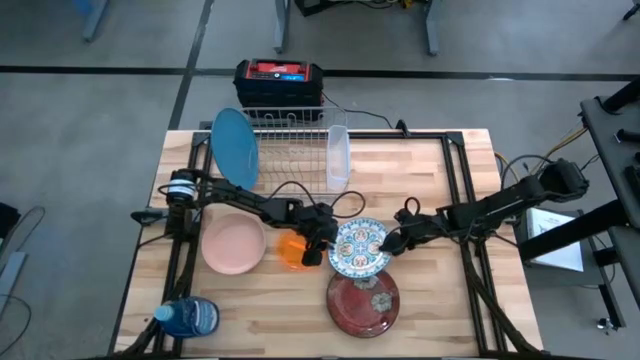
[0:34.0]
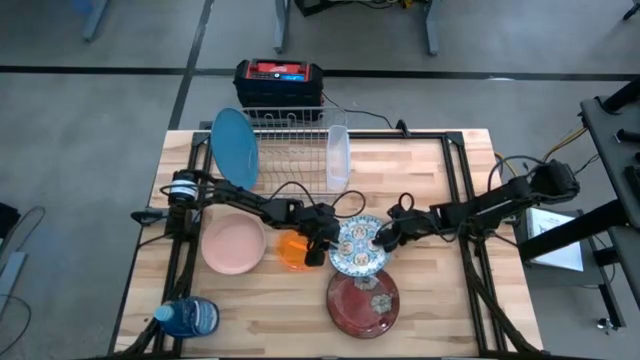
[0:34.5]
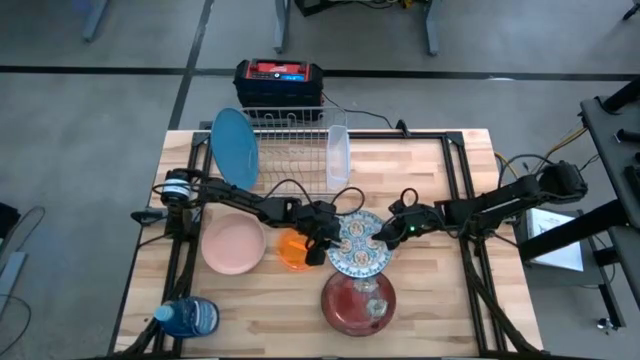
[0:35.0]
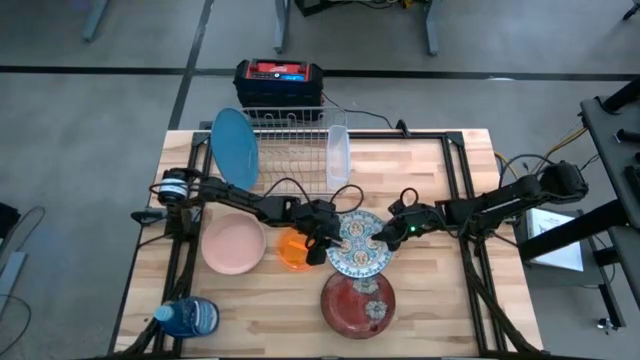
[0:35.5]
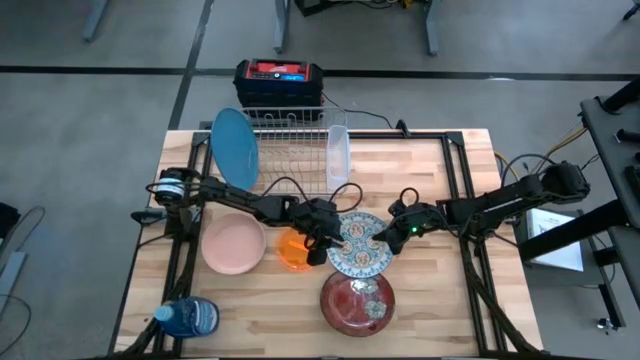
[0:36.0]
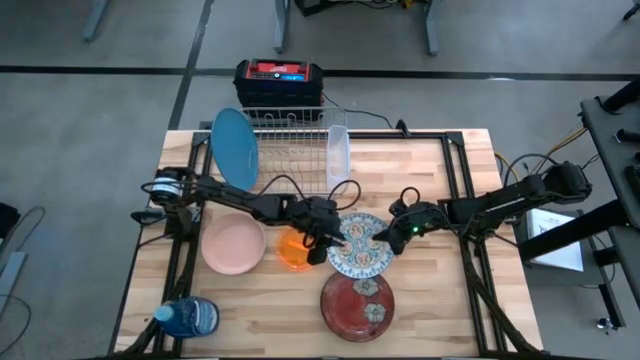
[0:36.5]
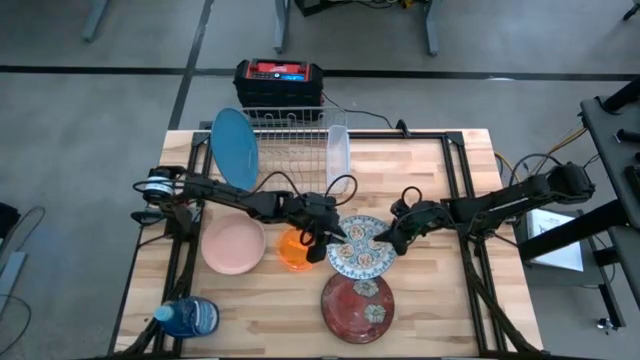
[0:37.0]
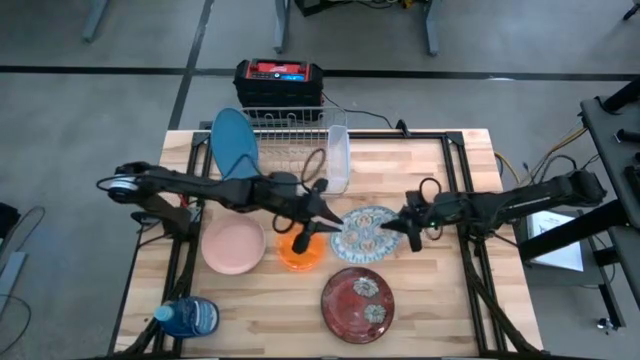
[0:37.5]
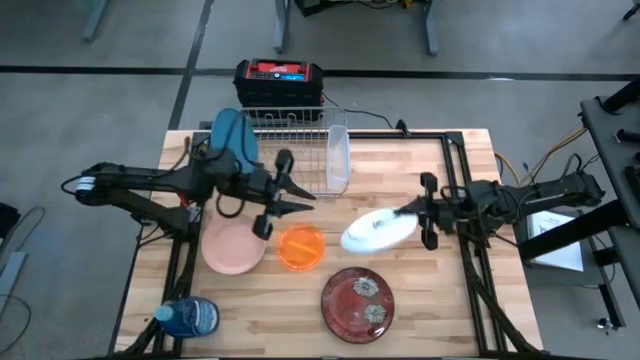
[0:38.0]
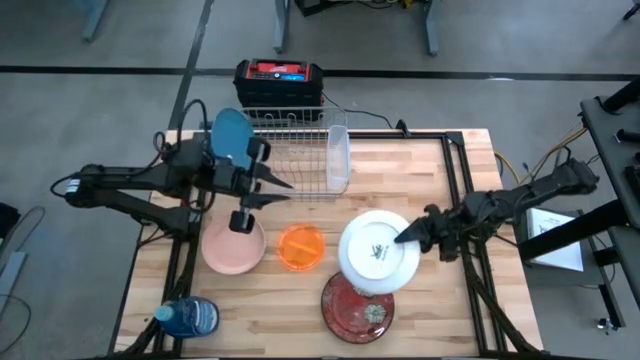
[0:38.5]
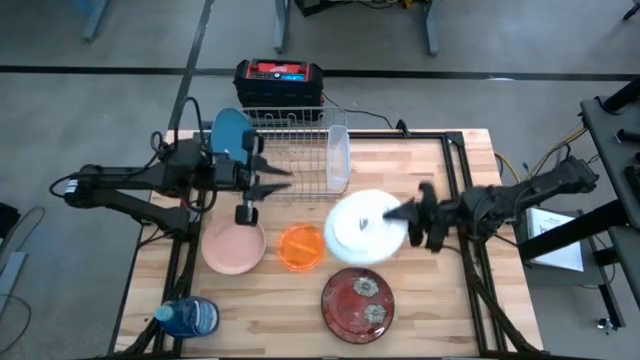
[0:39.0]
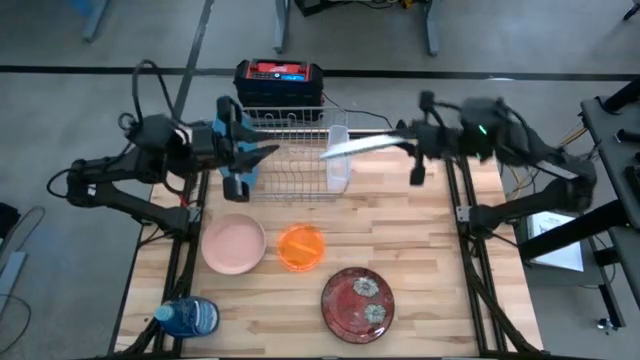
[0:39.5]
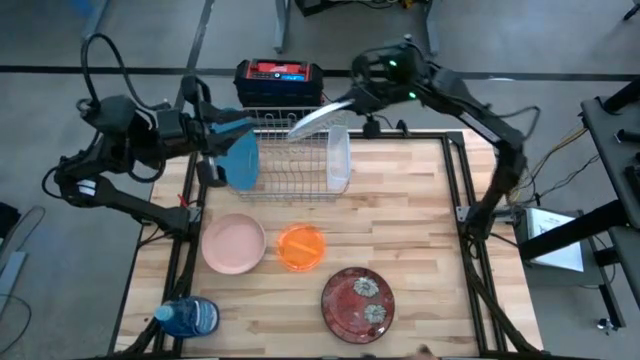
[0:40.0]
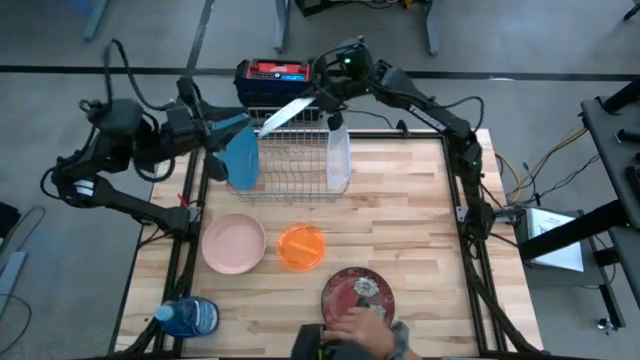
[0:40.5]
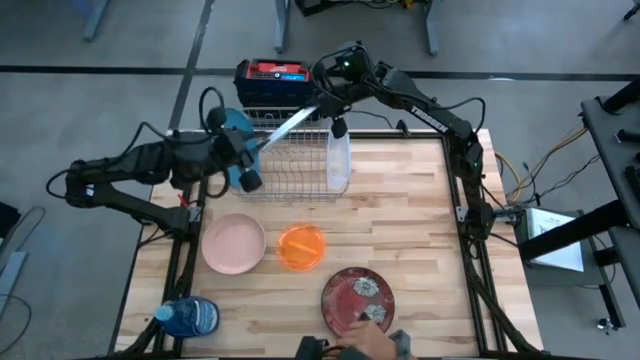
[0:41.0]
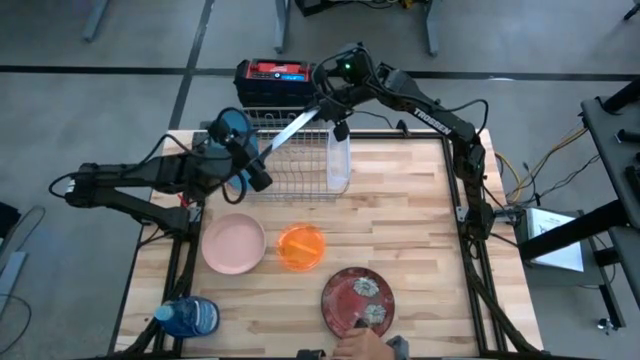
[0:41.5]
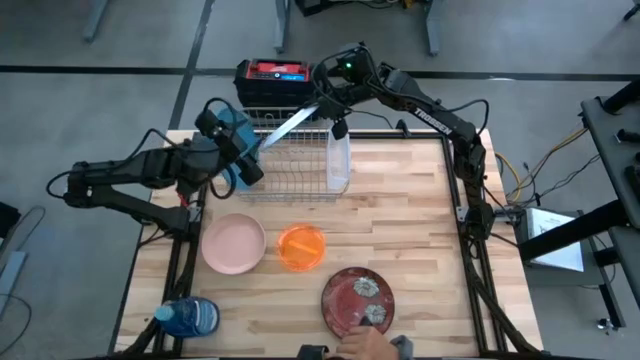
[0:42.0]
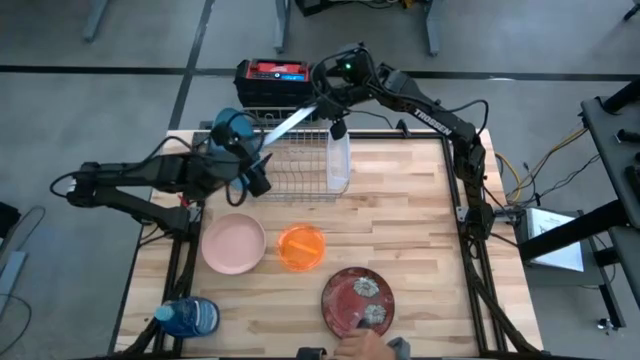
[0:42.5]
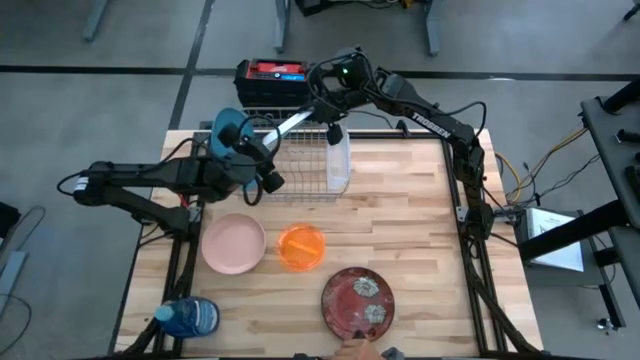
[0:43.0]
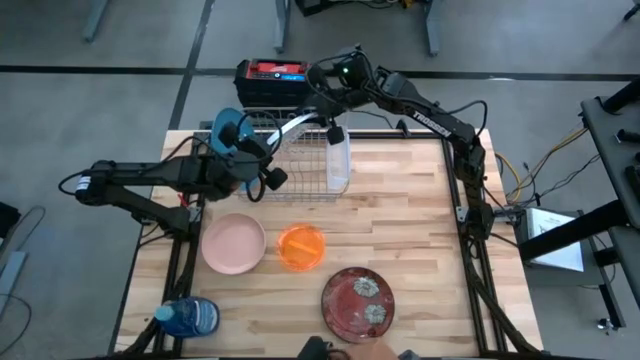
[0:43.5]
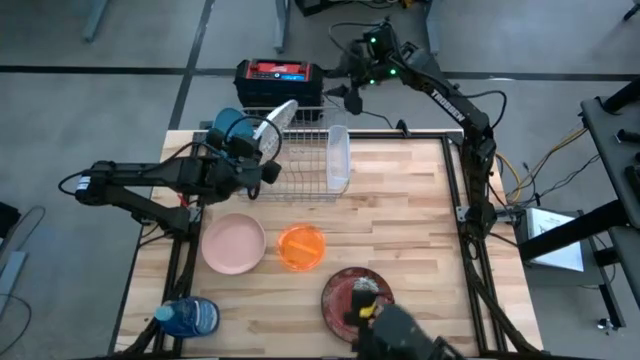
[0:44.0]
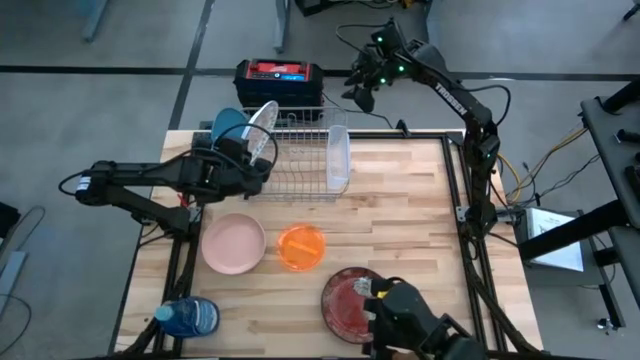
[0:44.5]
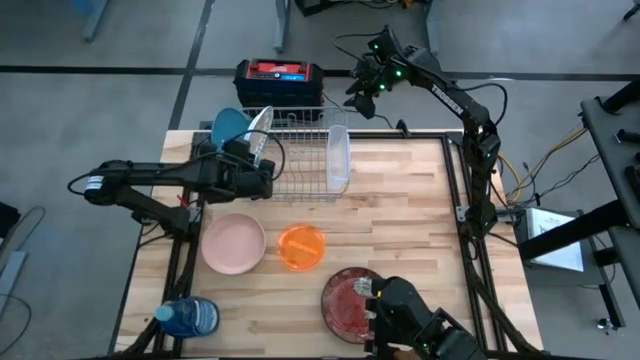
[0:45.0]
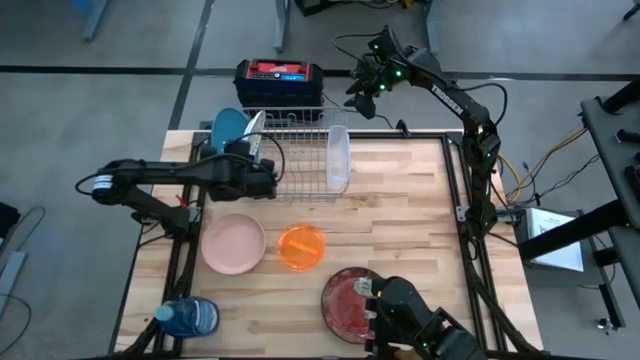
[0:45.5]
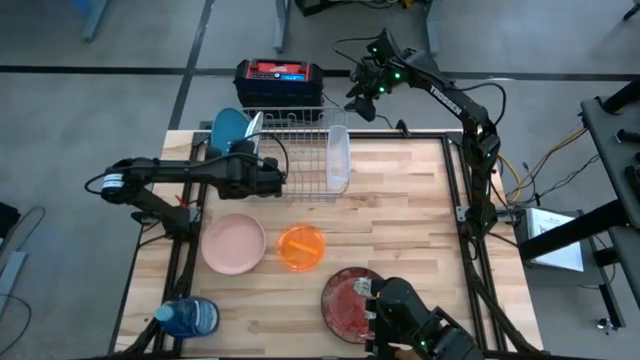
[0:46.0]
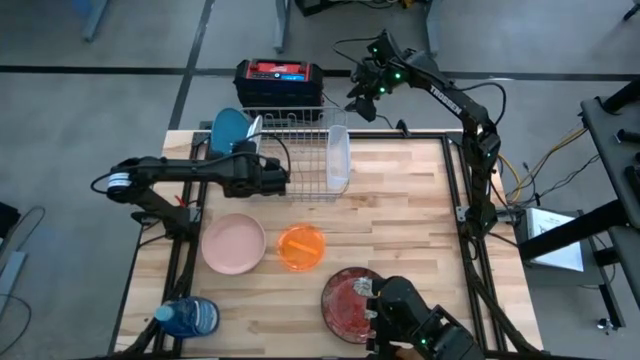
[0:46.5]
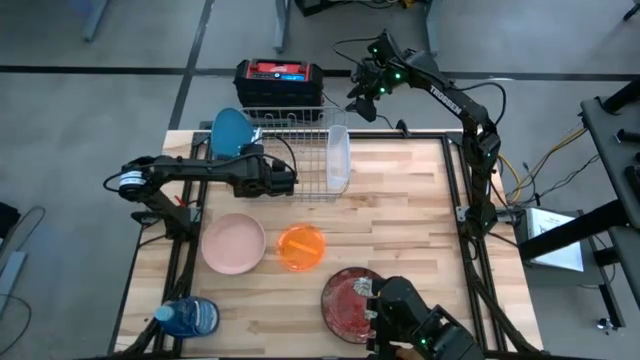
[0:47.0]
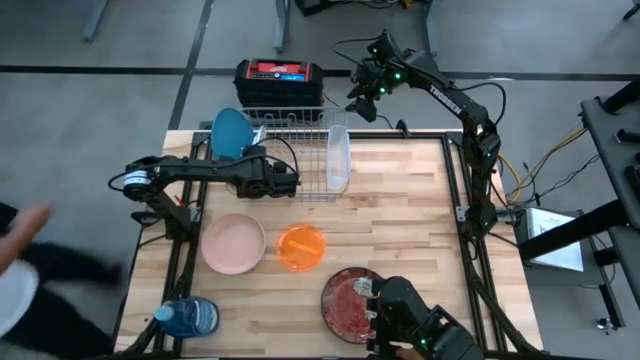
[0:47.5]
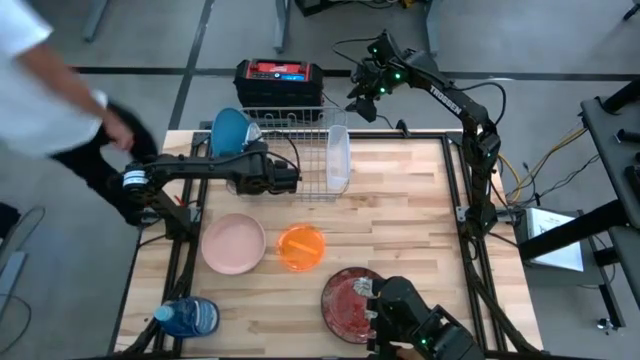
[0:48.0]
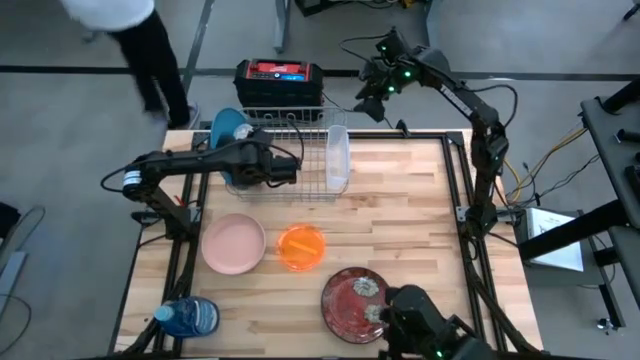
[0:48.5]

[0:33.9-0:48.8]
Task: Sort dishes
Put the white plate in the dishwasher rack

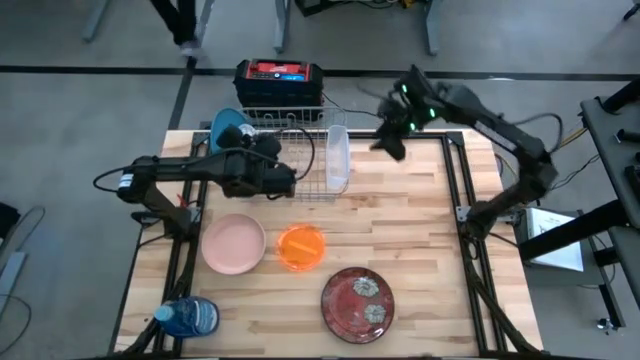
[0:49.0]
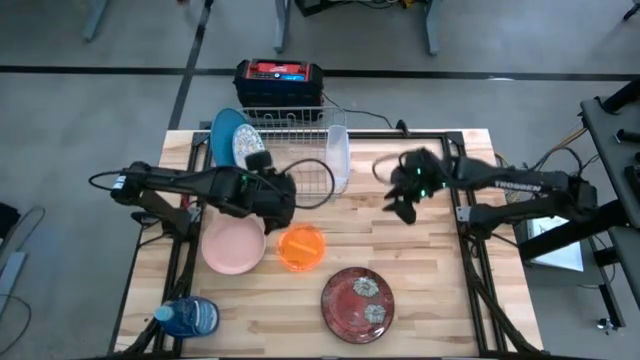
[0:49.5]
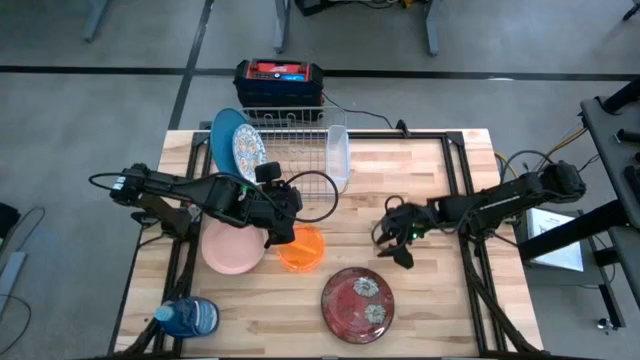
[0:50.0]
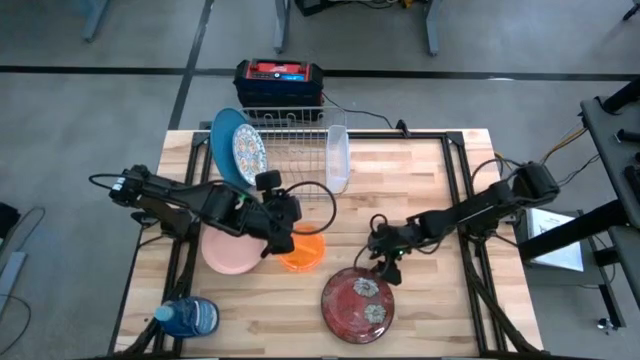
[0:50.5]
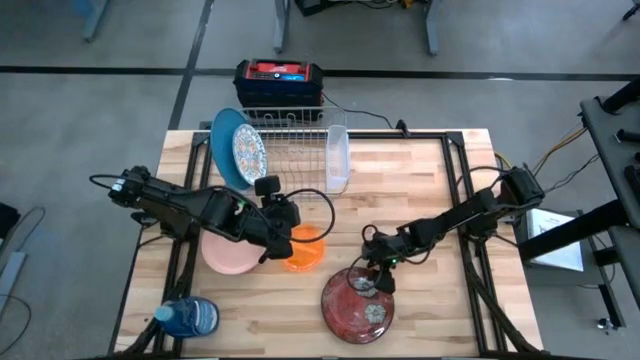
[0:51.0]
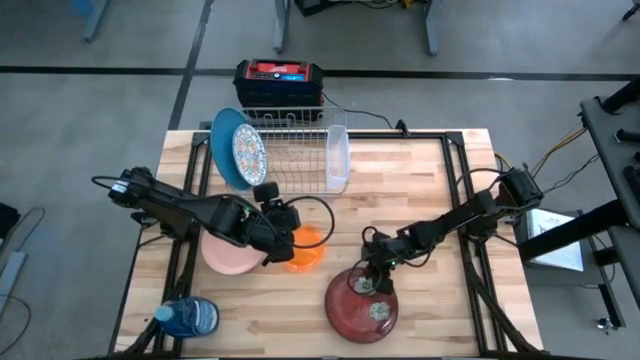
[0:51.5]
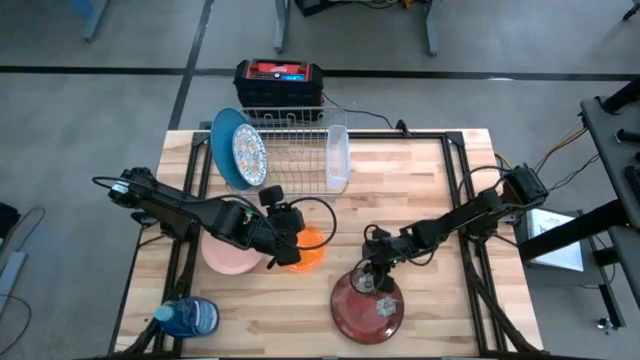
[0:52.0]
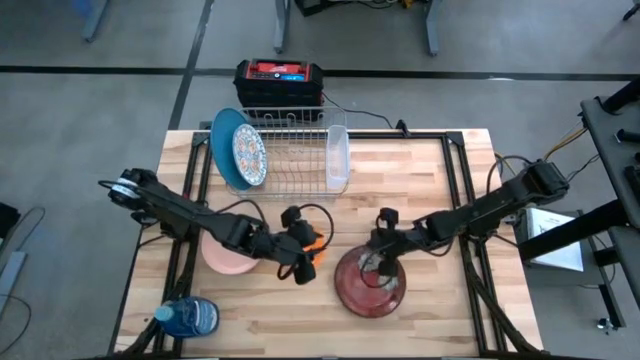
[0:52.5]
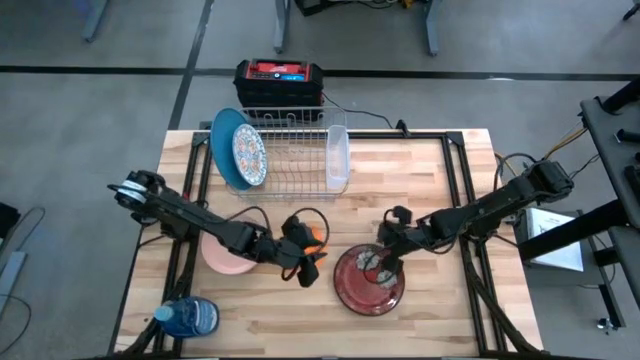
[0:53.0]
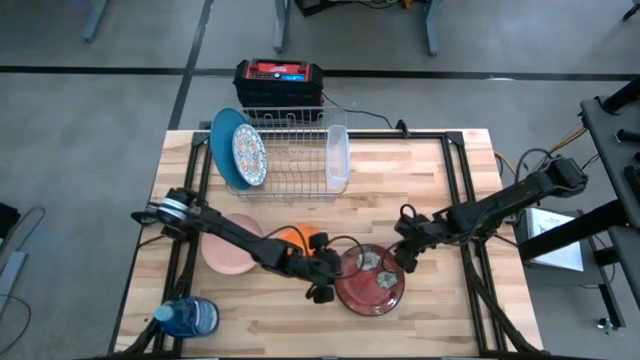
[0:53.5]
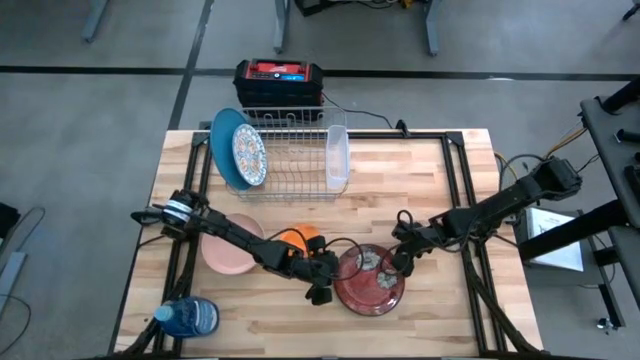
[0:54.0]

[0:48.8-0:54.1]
Put the red plate in the dishwasher rack

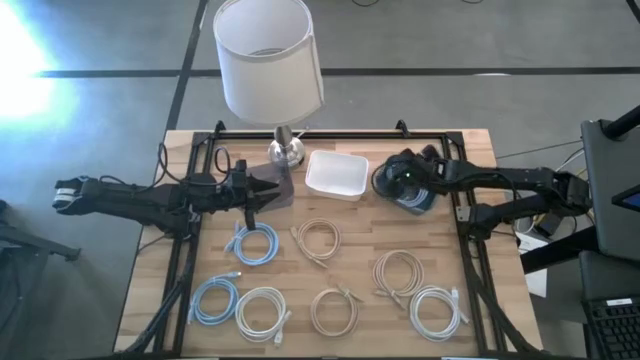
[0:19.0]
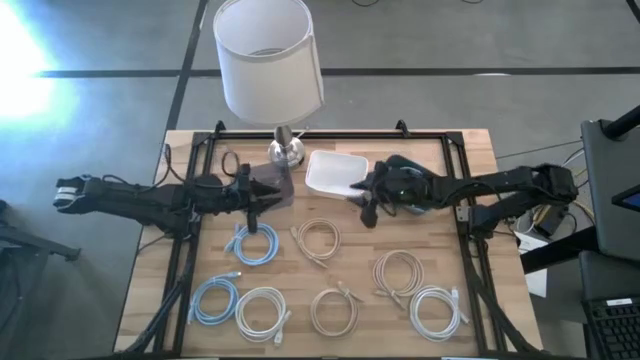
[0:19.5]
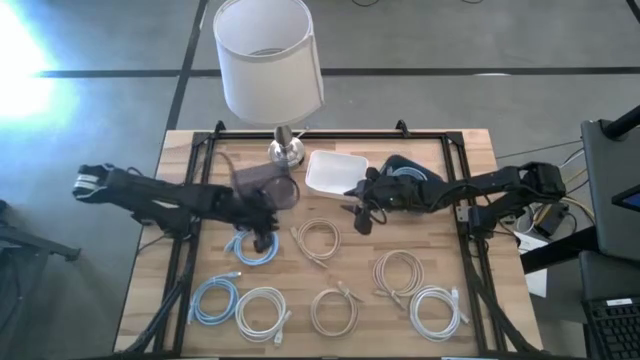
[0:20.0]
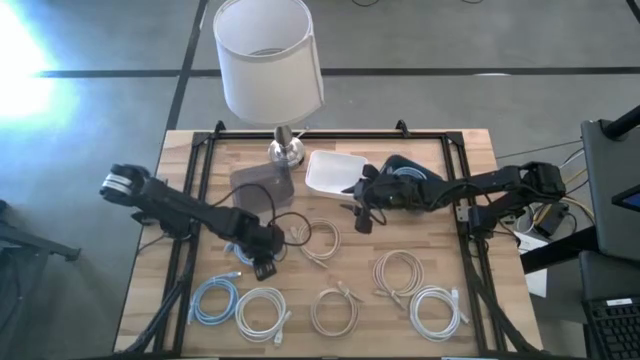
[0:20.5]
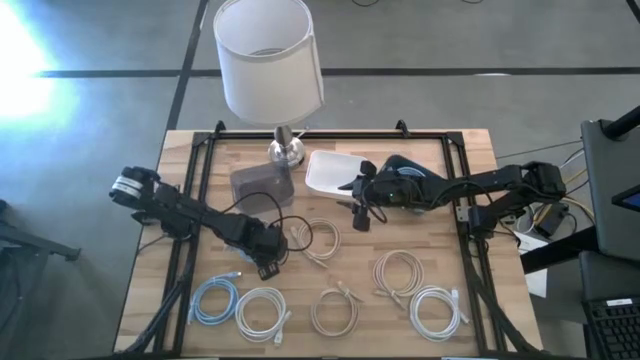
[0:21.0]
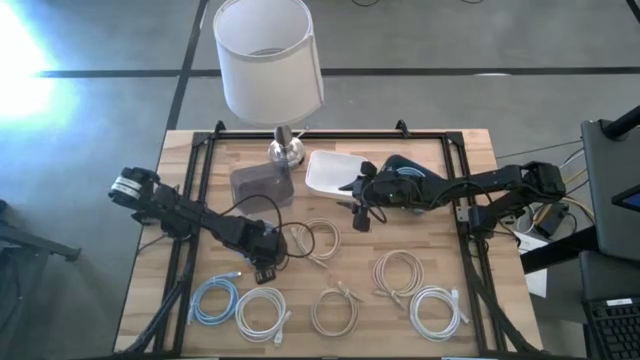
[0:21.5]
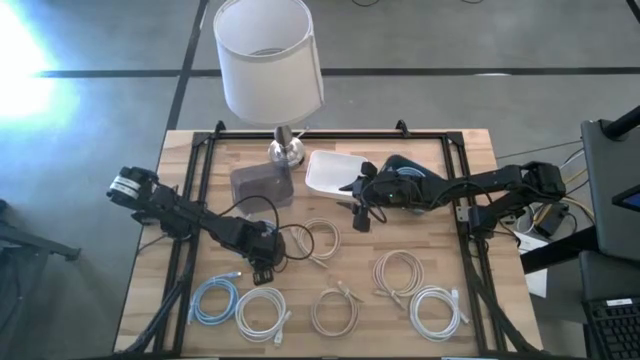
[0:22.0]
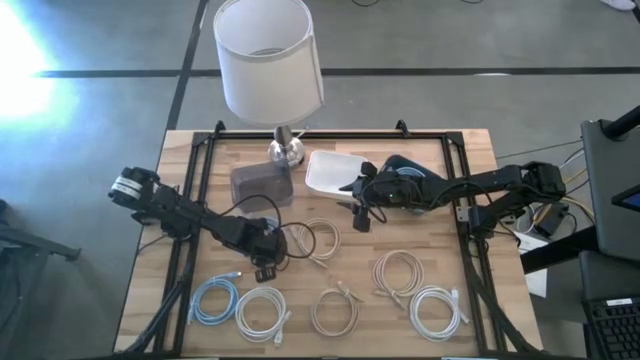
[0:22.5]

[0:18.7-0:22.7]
Task: Sort HDMI cables
Put the top blue hdmi cable into the blue bin
